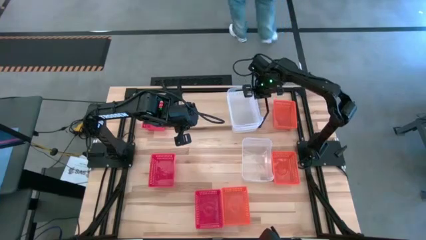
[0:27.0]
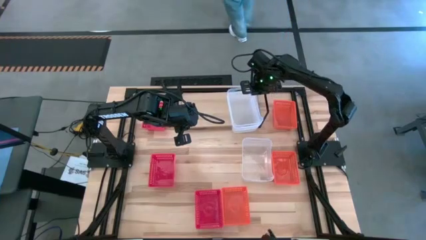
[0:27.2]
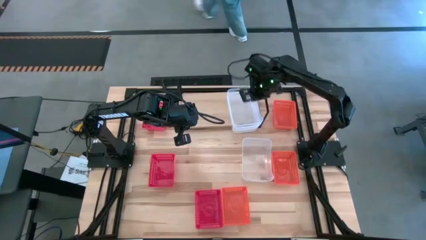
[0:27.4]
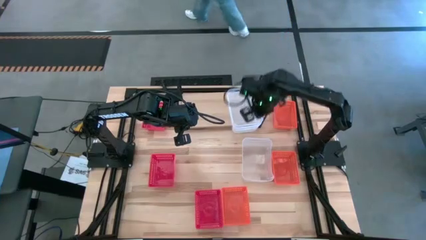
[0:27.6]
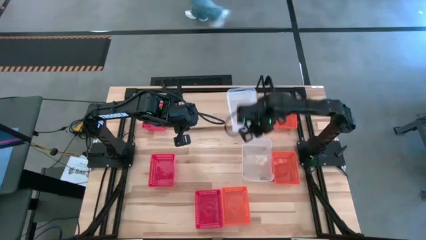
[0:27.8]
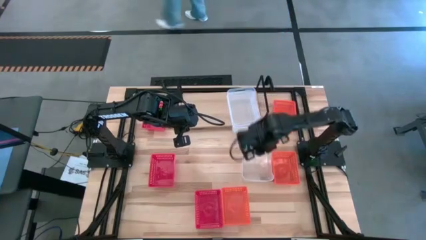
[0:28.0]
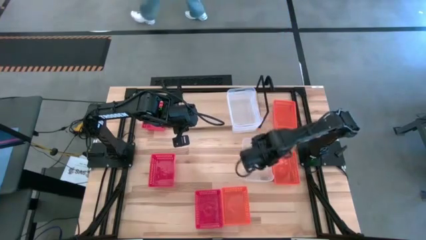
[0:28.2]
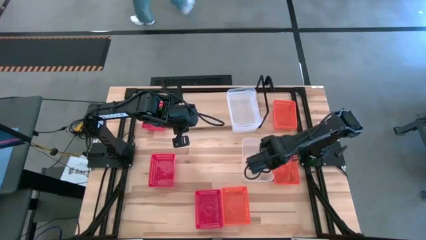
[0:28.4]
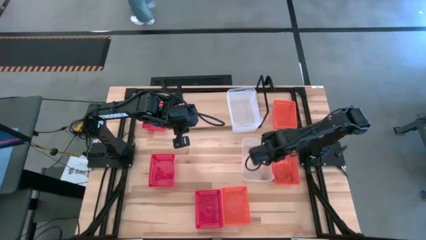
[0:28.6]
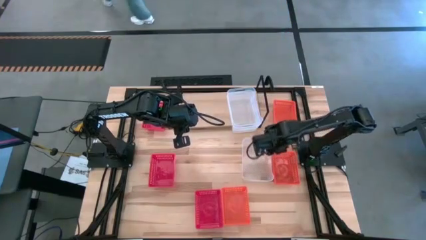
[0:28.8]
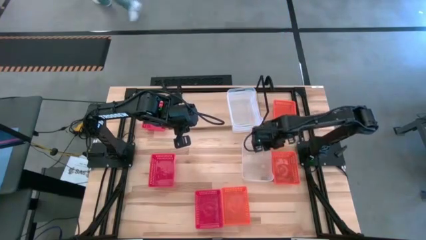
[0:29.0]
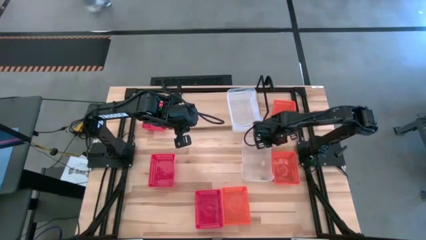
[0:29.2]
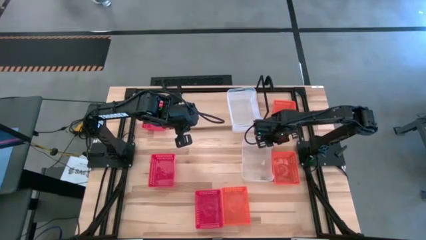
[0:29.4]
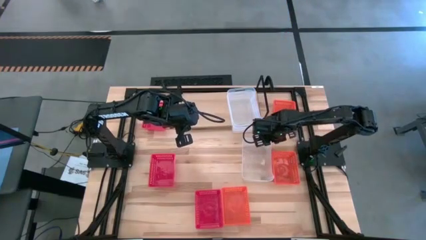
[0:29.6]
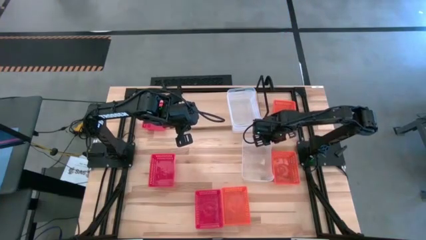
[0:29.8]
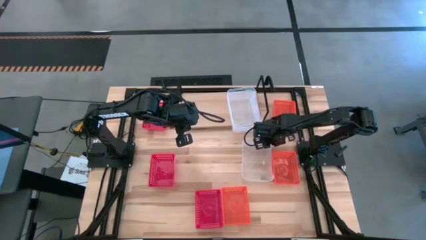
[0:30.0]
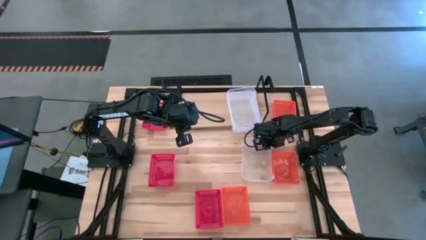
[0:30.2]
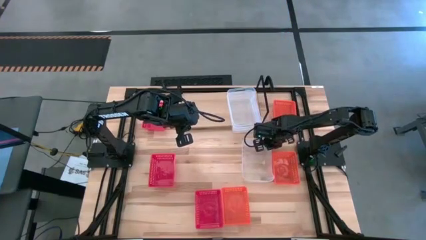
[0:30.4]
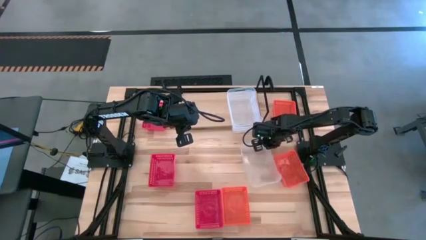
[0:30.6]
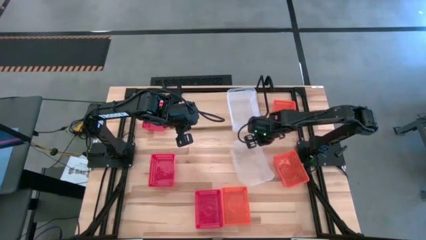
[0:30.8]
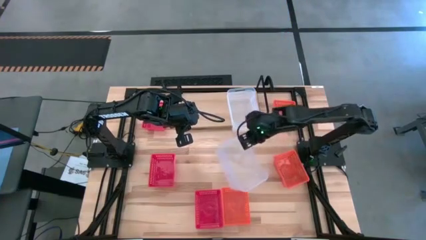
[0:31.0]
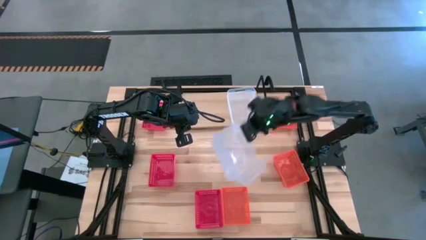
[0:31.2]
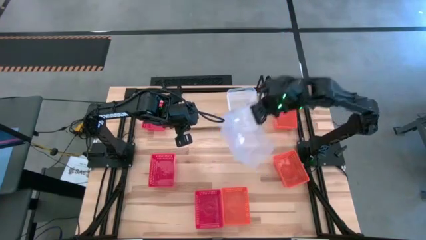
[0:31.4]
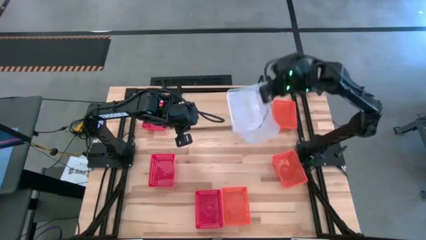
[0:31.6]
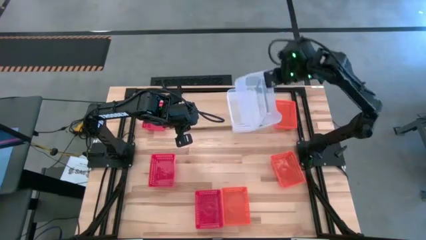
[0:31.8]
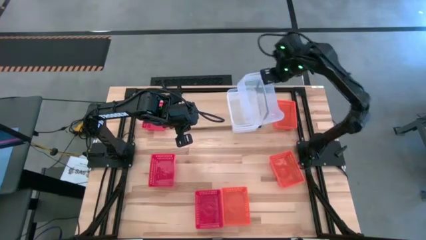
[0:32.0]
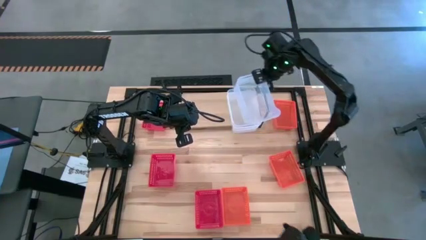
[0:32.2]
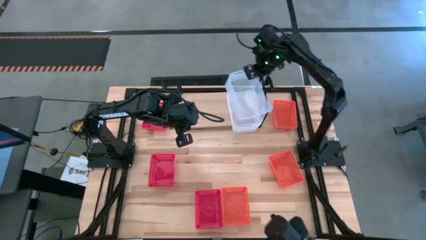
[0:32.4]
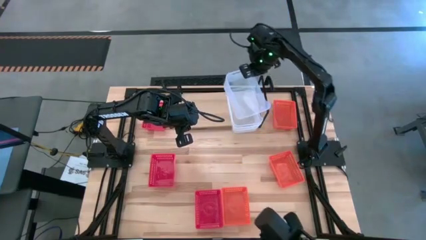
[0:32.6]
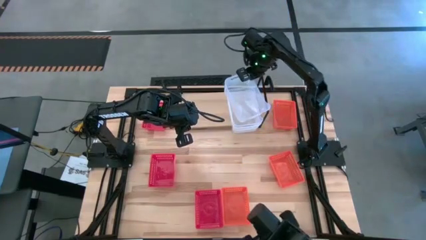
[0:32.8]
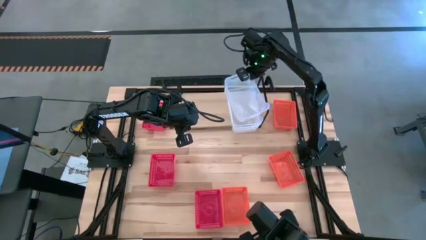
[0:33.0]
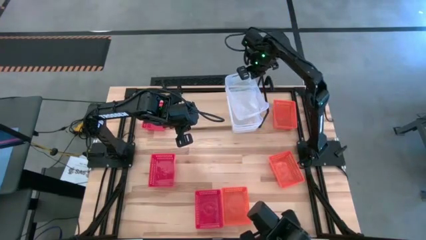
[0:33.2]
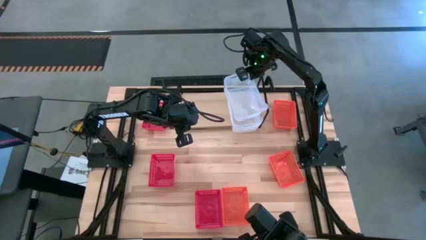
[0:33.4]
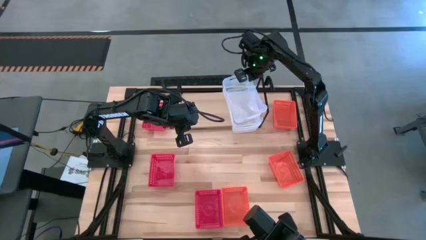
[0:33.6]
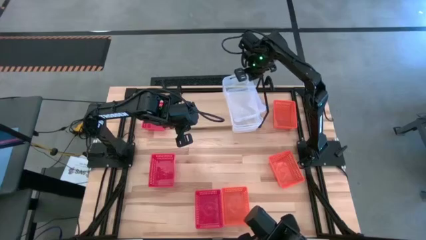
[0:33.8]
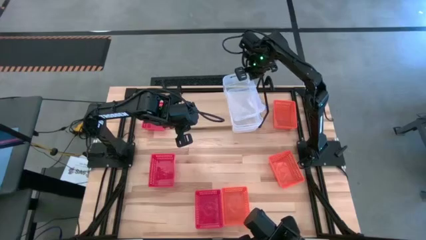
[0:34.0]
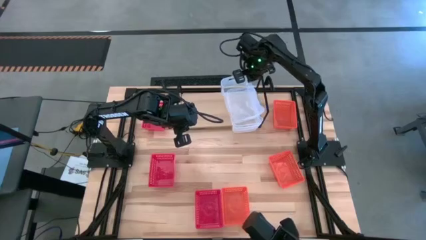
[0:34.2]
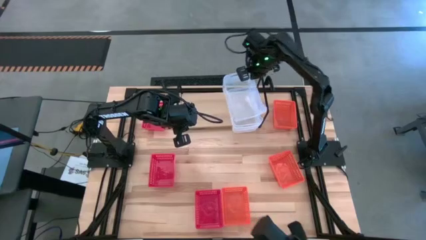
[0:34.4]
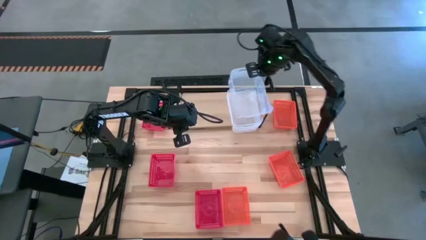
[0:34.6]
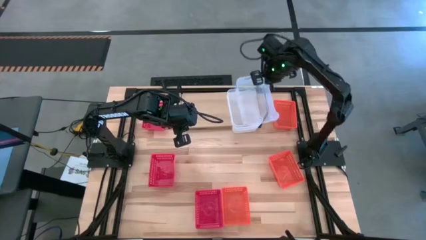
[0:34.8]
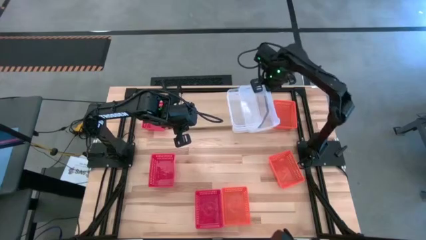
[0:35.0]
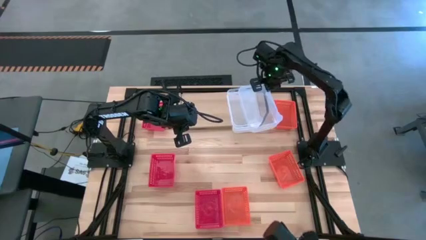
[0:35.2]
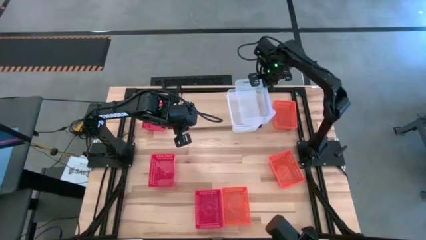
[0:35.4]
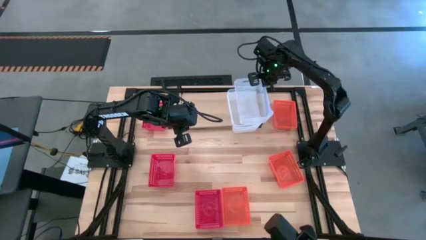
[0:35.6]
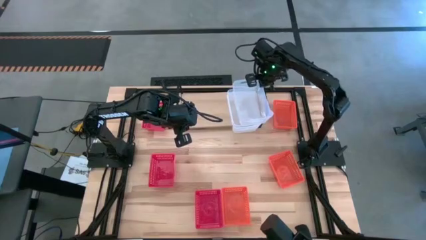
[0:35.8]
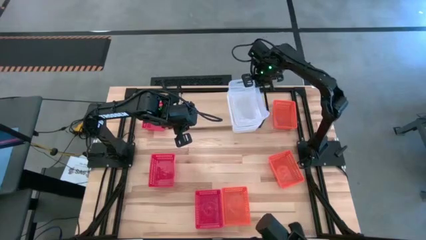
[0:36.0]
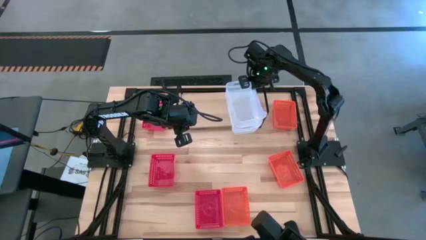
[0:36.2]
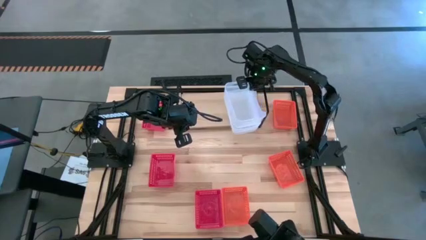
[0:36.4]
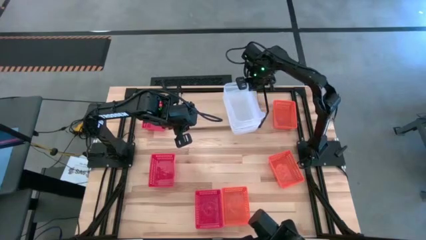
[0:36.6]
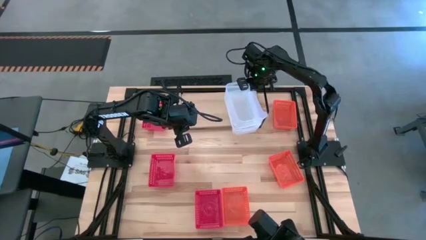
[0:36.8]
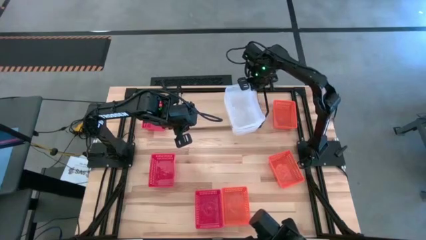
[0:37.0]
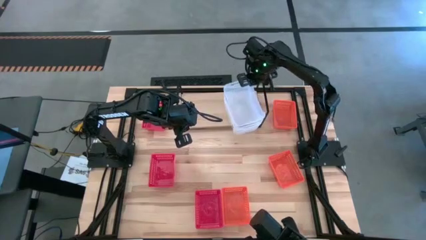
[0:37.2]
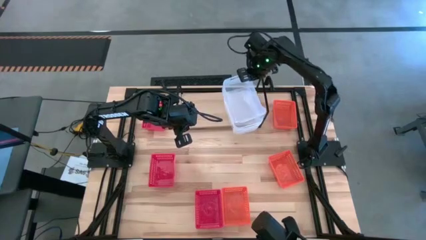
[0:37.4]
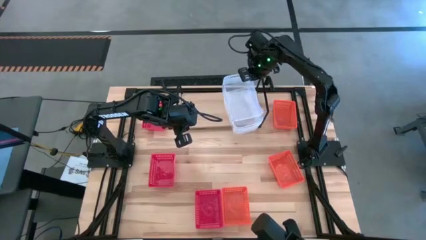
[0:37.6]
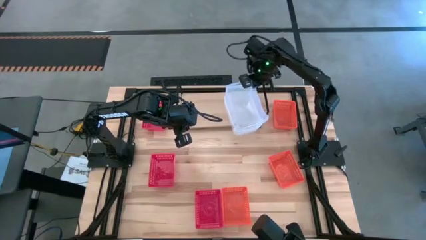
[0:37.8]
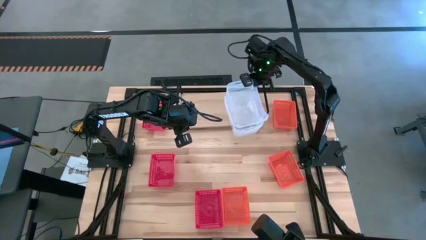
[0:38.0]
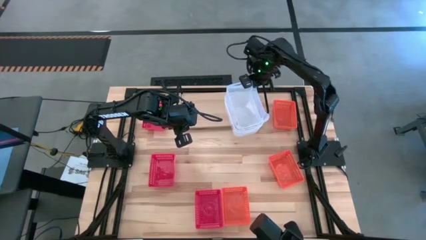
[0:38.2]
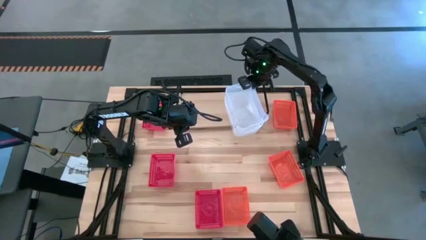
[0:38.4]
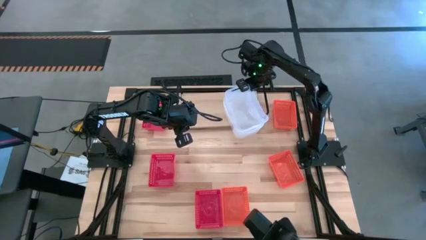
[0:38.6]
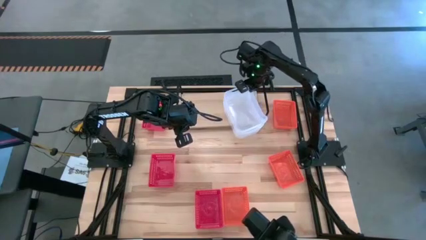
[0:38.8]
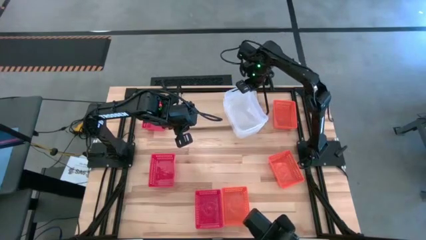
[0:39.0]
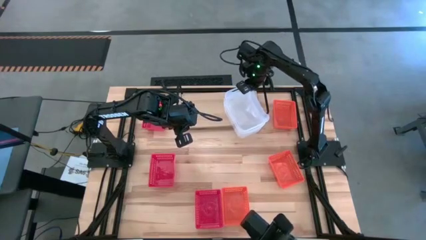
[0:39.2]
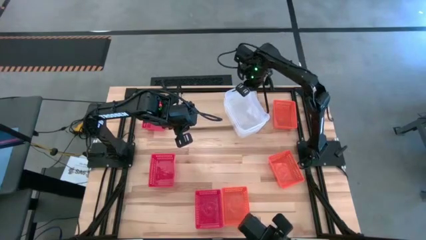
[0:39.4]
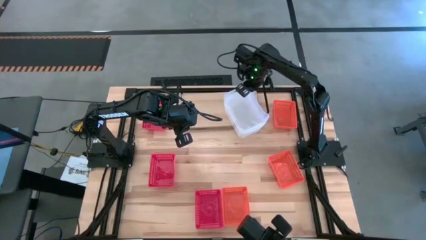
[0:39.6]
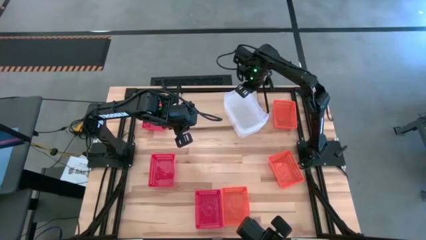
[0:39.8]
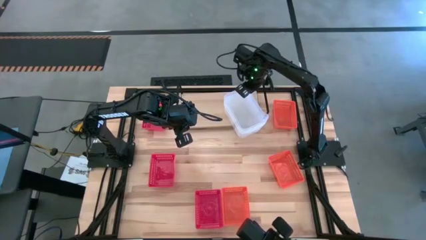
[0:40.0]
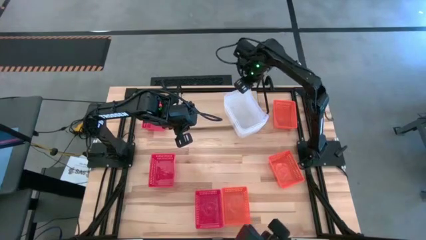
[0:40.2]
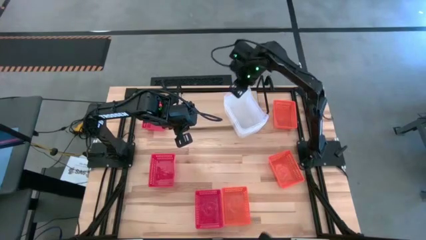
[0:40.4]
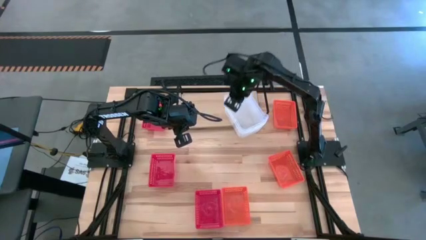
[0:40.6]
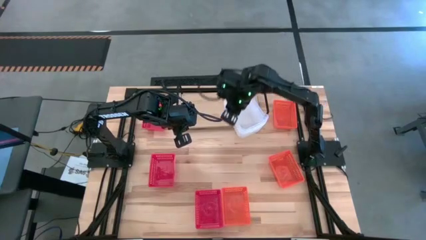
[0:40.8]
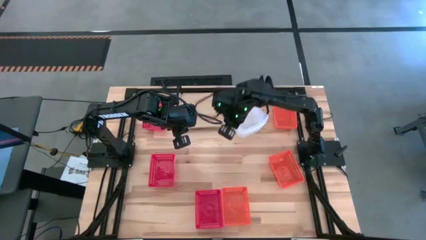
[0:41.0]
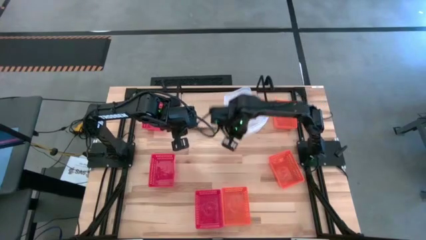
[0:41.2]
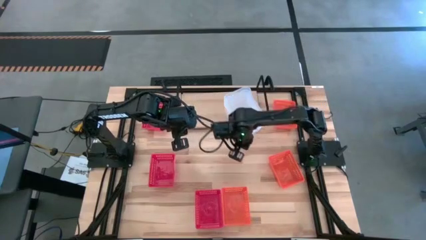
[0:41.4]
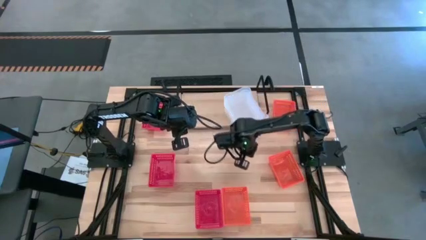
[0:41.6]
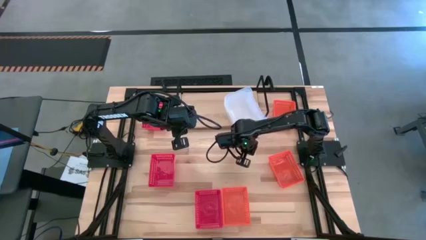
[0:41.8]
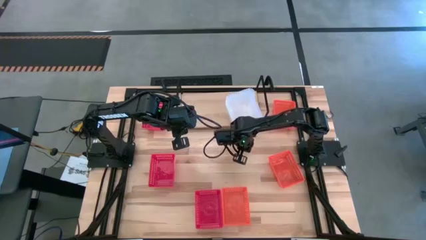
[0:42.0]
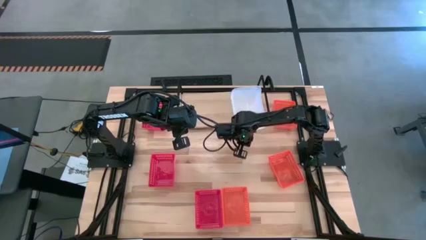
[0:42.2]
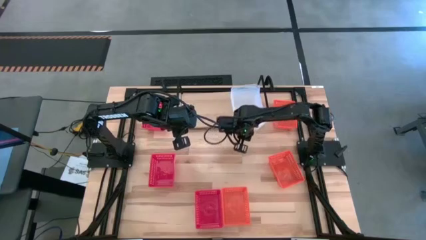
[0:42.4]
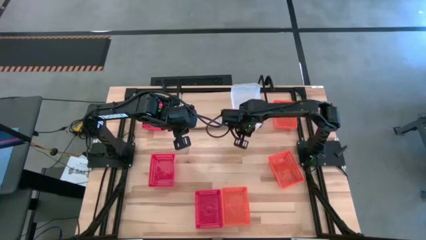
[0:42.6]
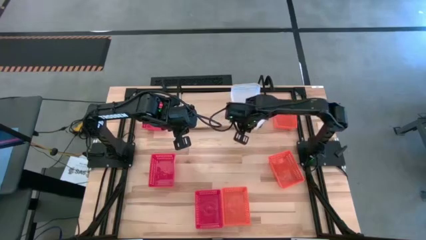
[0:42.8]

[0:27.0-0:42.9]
Task: Stack baskets on shelf by color
Stack the white bin on top of the white bins on the shelf

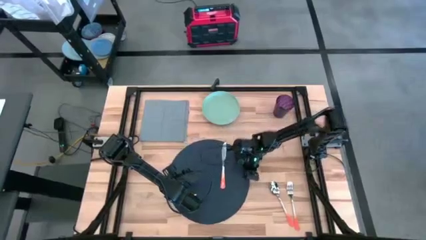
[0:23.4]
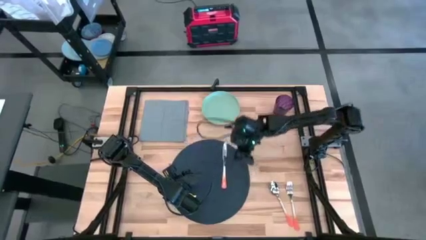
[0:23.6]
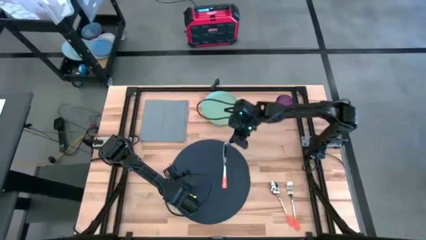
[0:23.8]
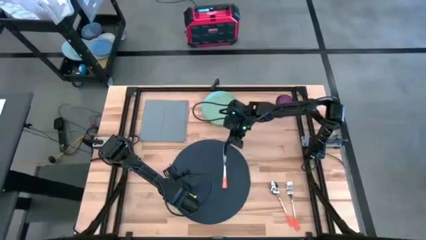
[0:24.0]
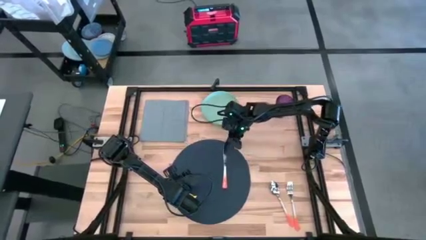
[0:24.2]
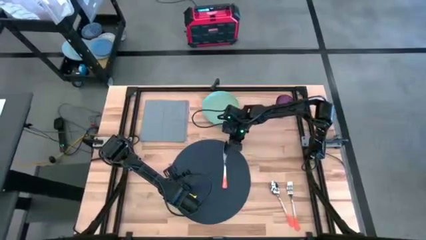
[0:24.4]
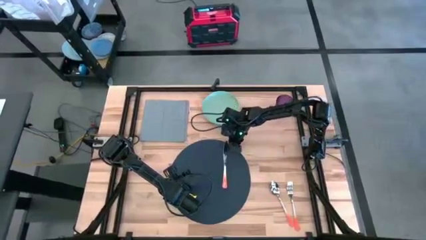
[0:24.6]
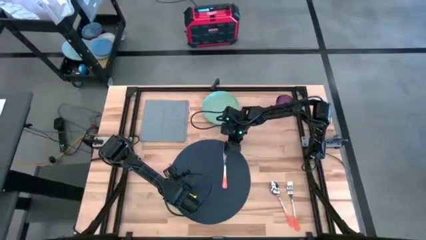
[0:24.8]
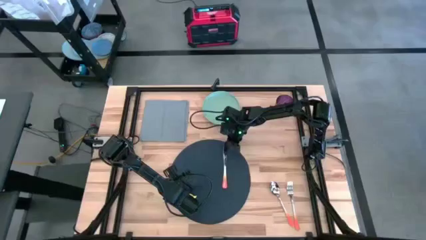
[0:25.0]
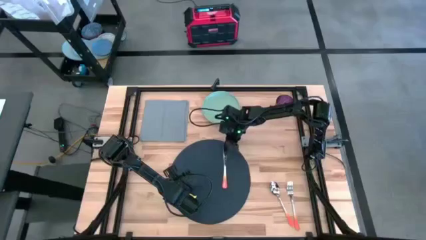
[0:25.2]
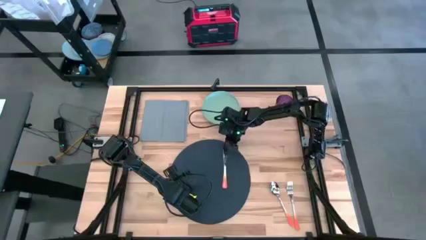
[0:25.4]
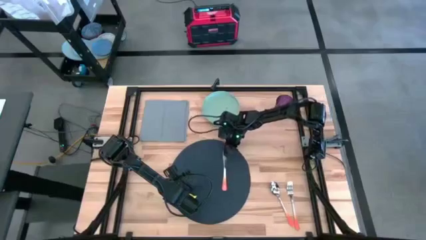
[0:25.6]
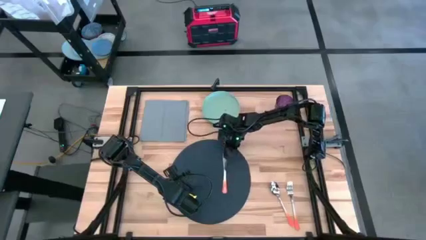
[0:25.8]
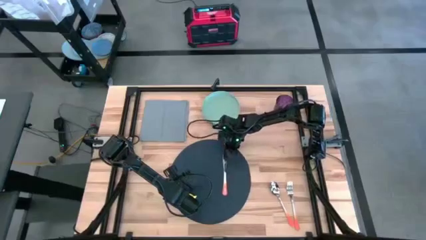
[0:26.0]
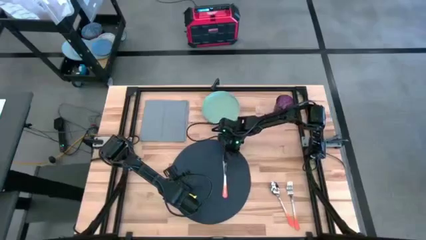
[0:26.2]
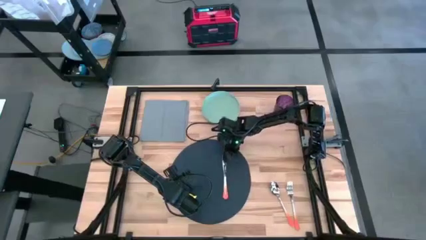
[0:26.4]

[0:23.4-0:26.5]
Task: Set table place
Adjust the orange table knife on the dark gray placemat
